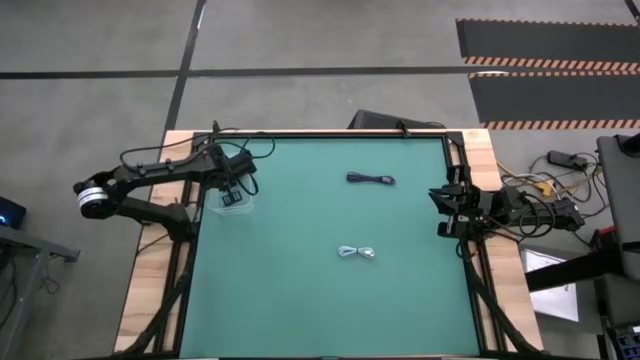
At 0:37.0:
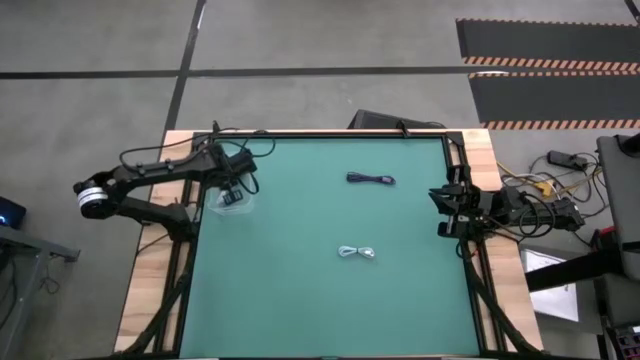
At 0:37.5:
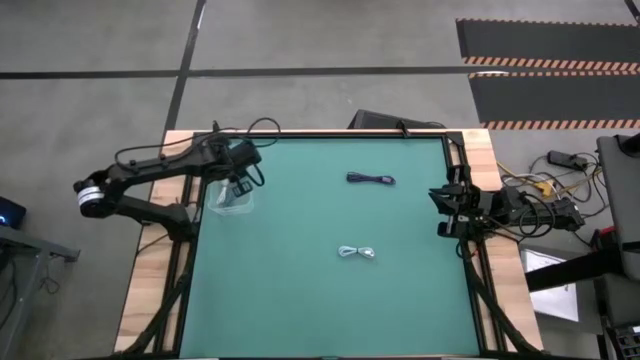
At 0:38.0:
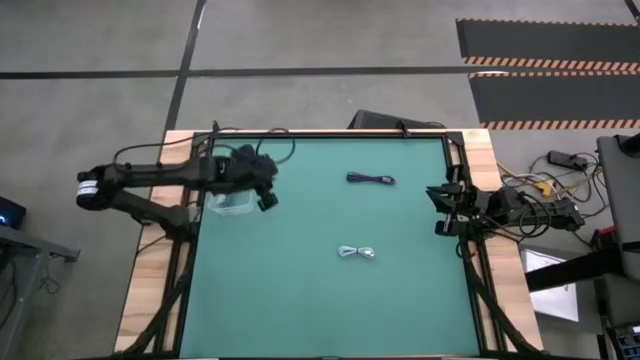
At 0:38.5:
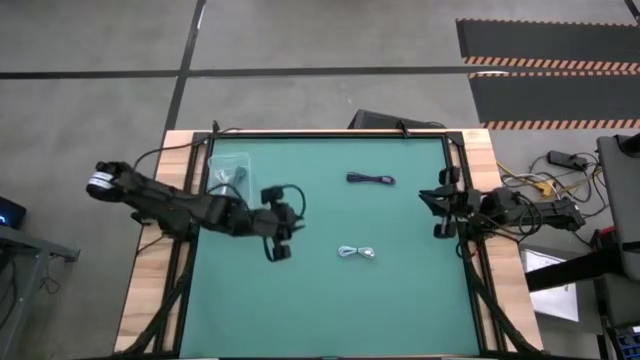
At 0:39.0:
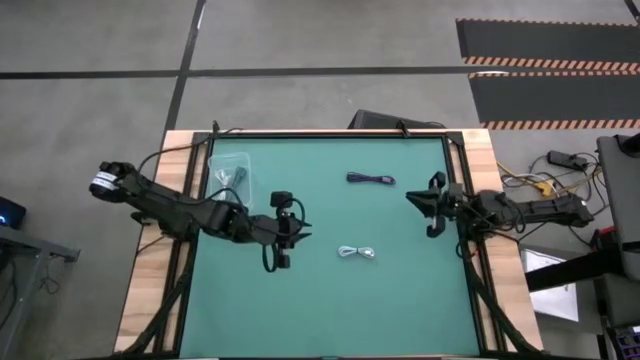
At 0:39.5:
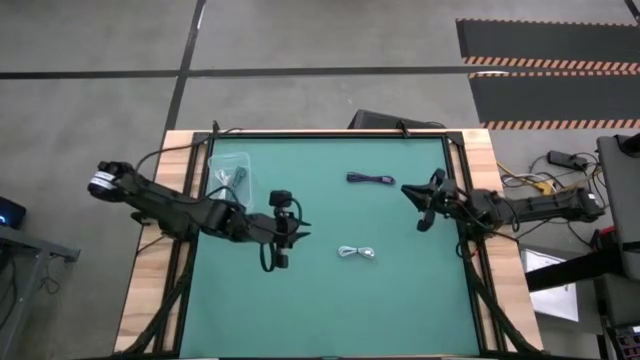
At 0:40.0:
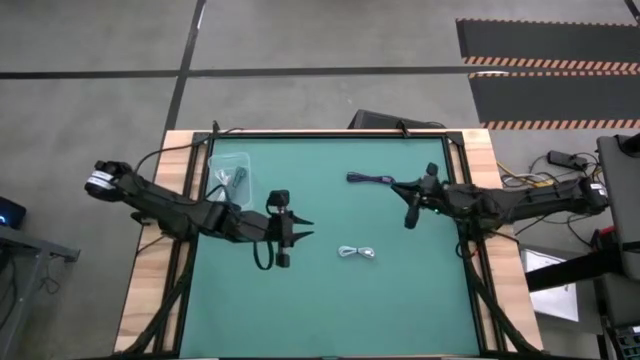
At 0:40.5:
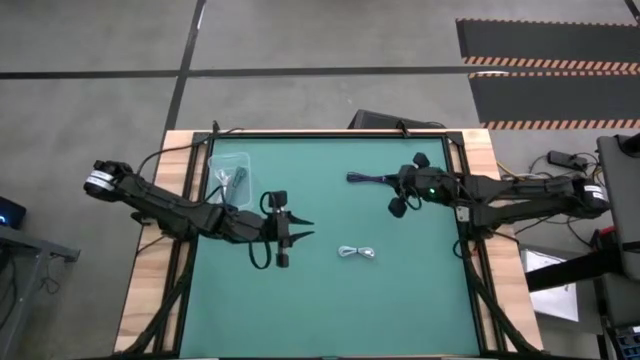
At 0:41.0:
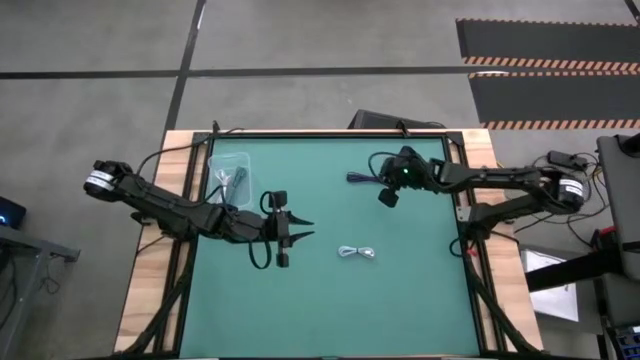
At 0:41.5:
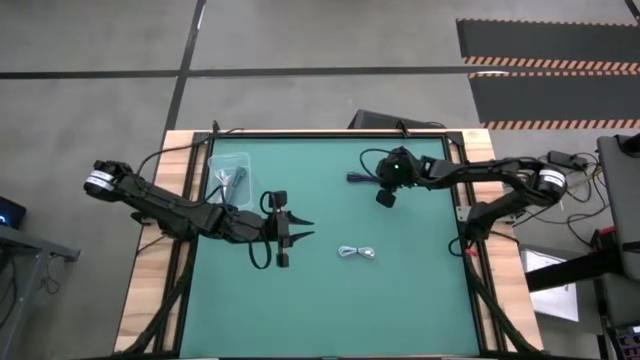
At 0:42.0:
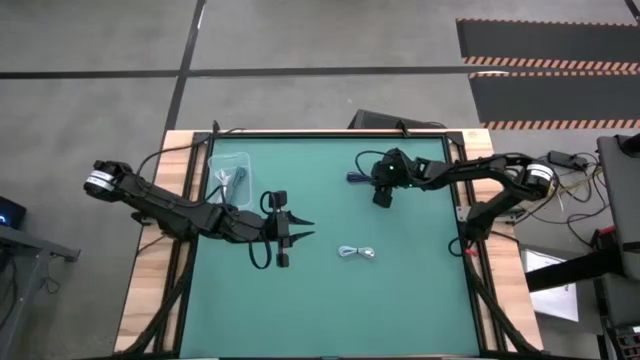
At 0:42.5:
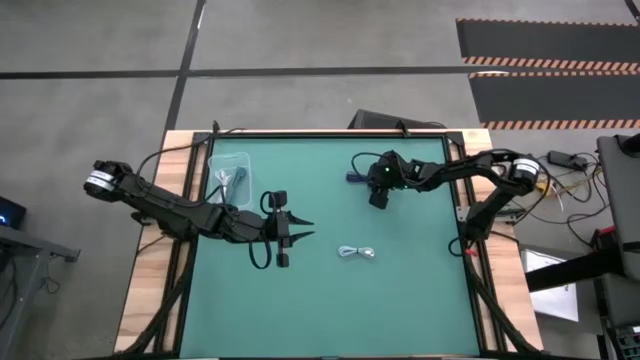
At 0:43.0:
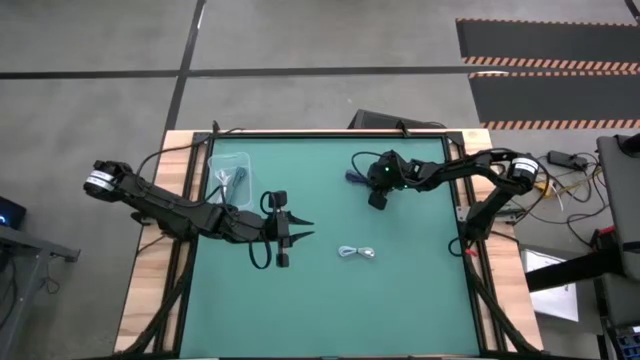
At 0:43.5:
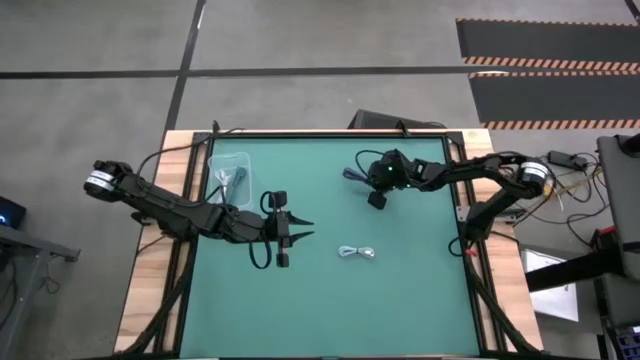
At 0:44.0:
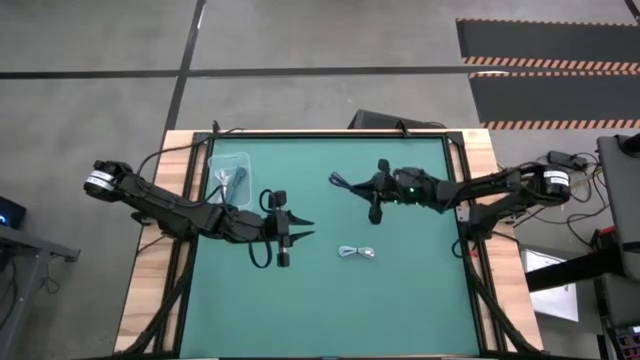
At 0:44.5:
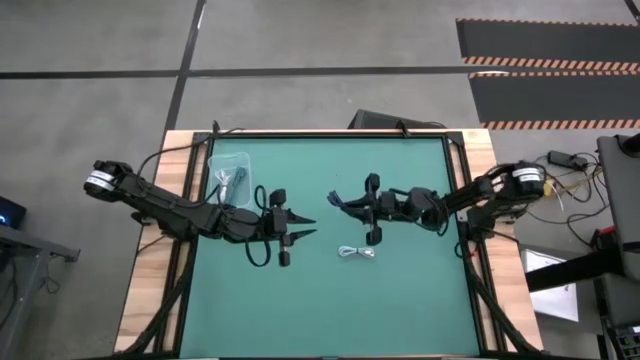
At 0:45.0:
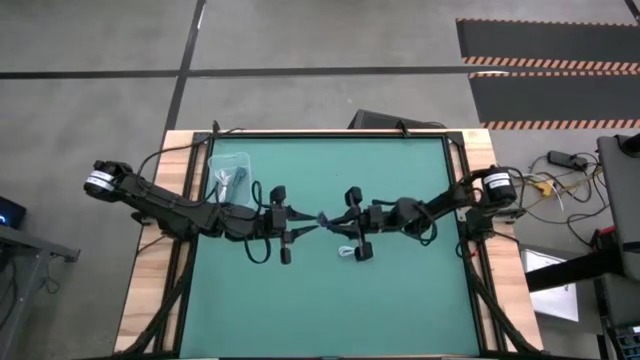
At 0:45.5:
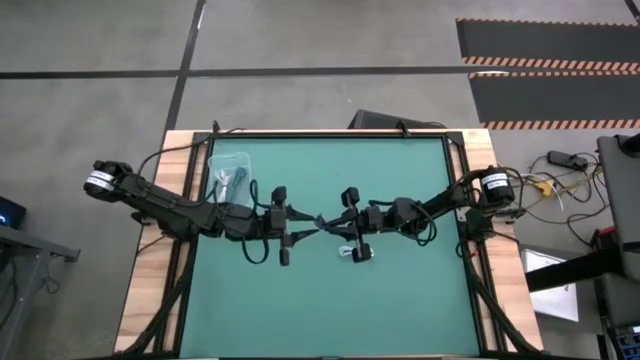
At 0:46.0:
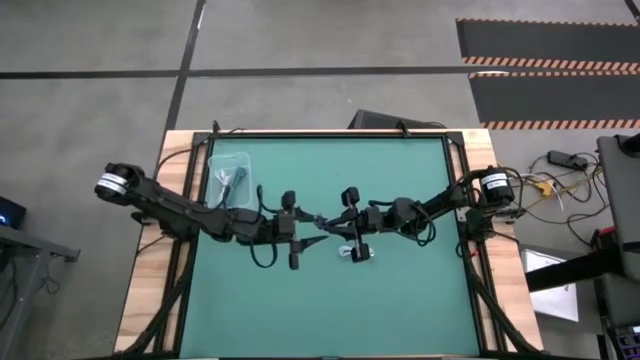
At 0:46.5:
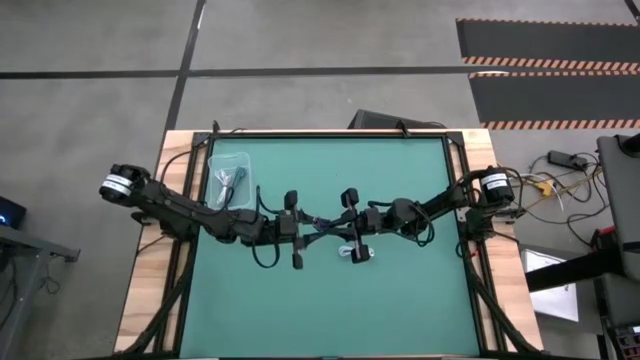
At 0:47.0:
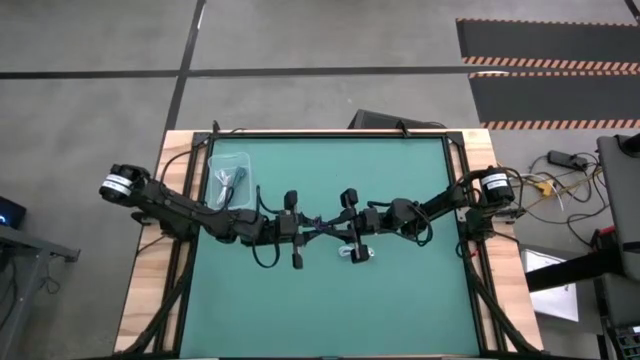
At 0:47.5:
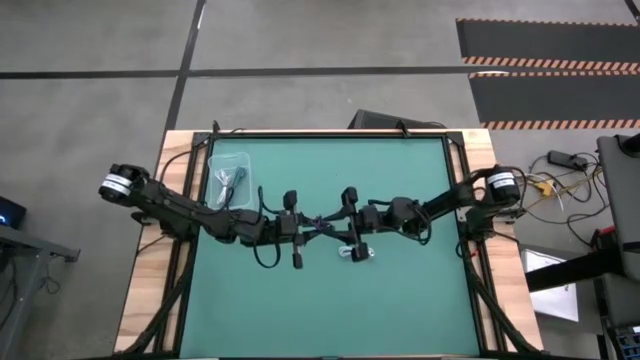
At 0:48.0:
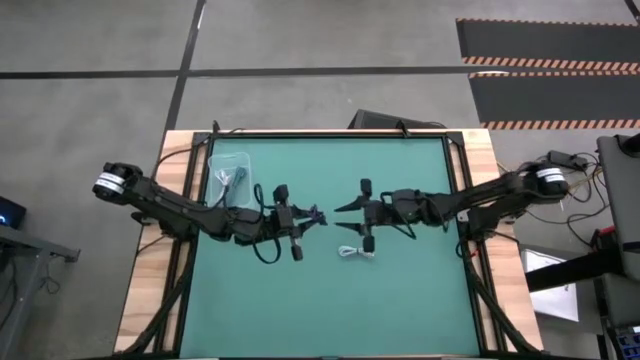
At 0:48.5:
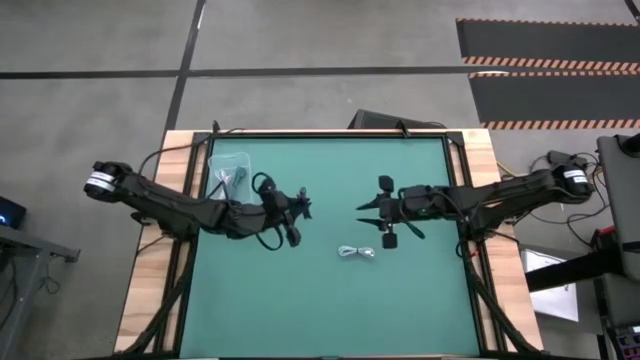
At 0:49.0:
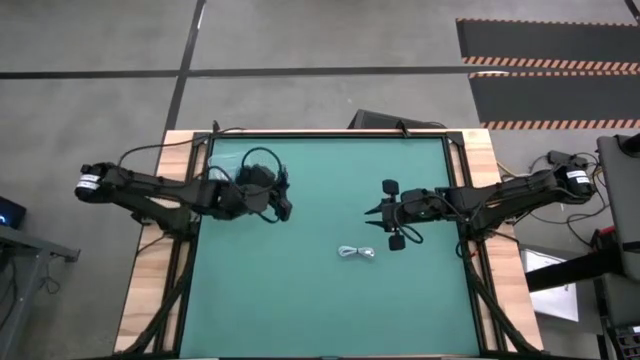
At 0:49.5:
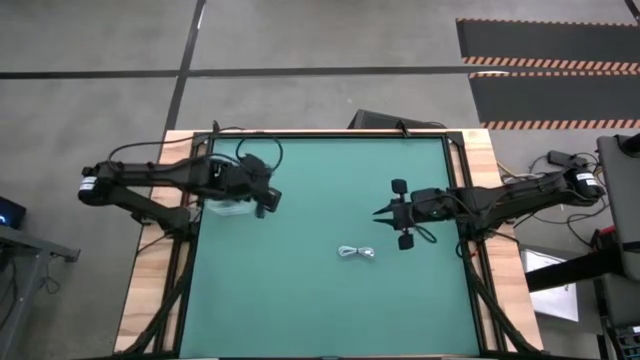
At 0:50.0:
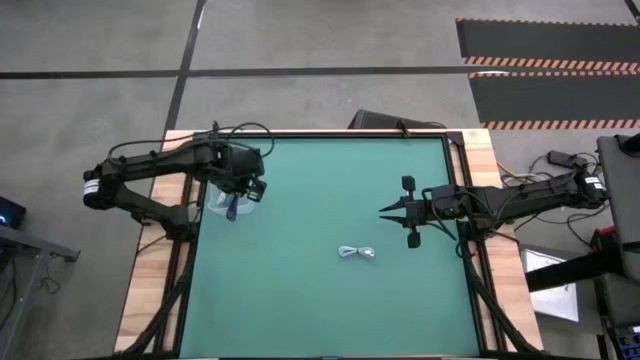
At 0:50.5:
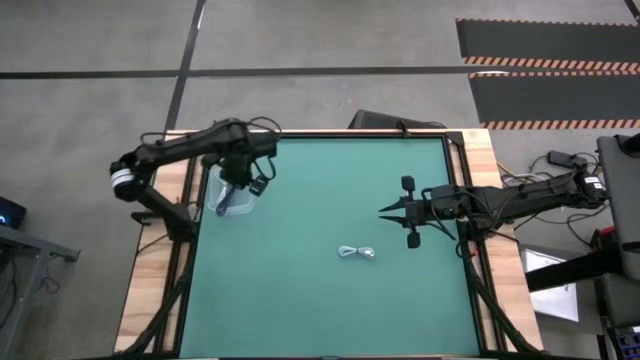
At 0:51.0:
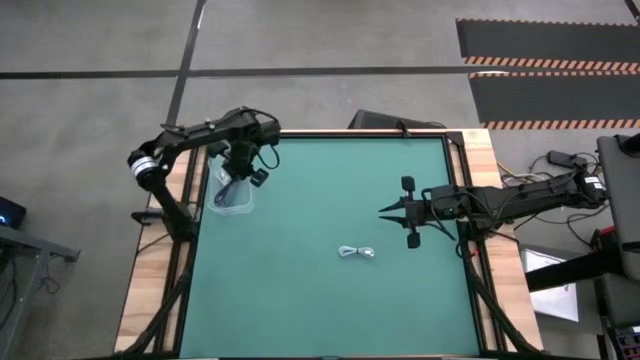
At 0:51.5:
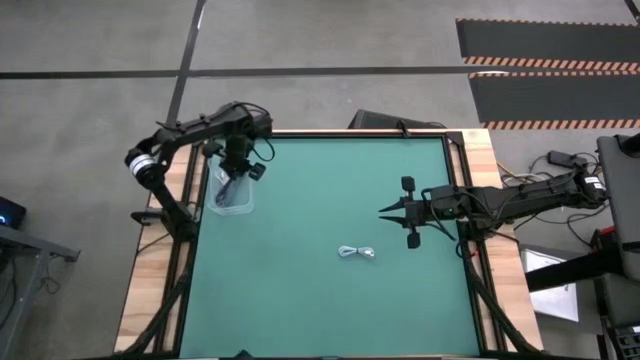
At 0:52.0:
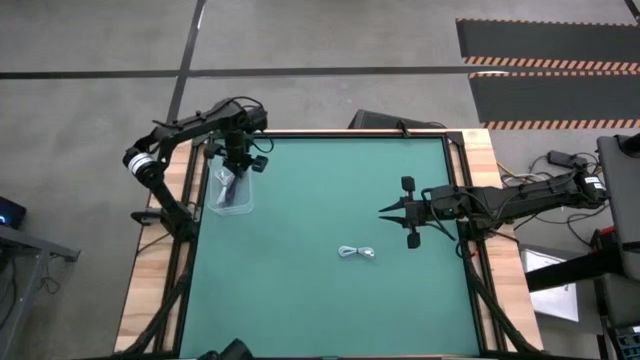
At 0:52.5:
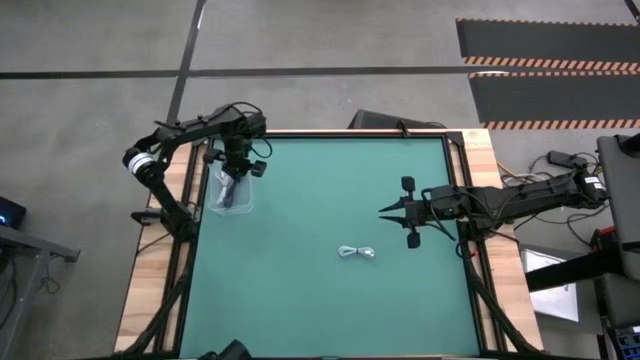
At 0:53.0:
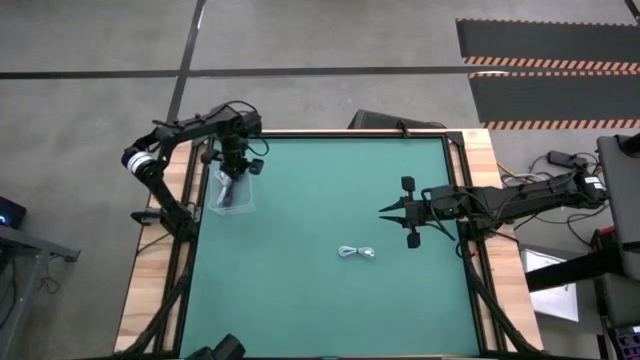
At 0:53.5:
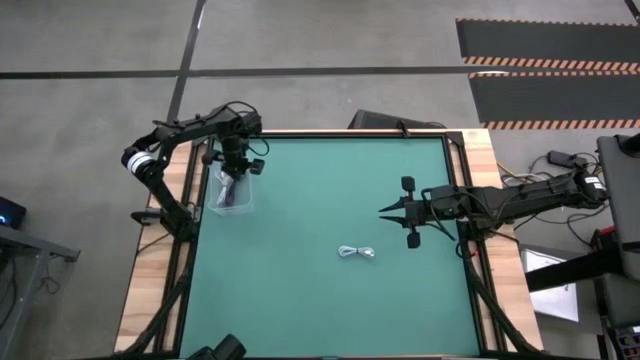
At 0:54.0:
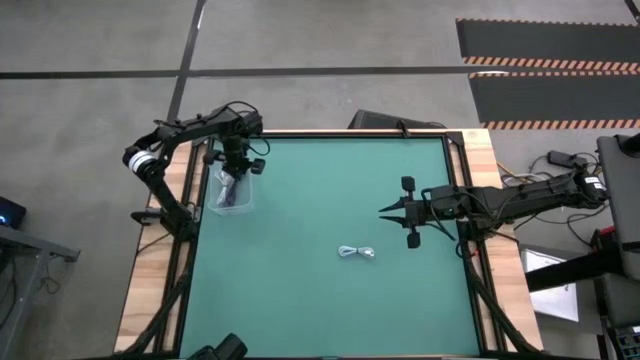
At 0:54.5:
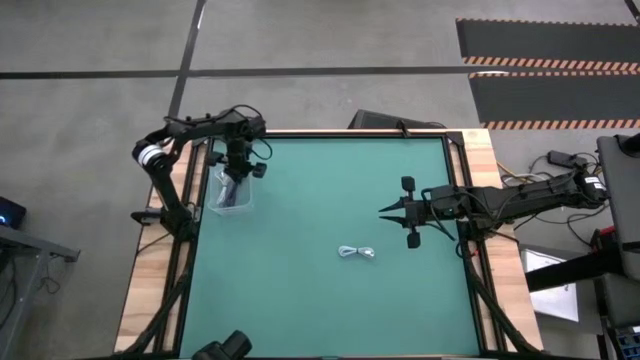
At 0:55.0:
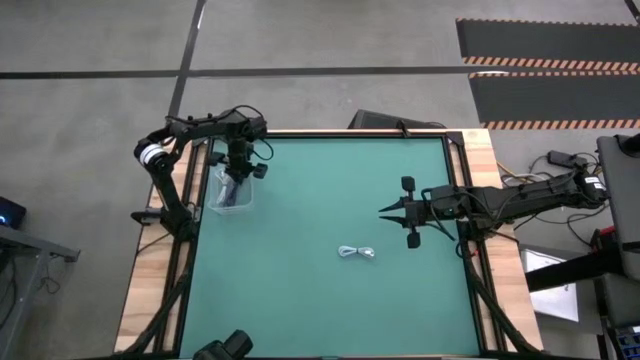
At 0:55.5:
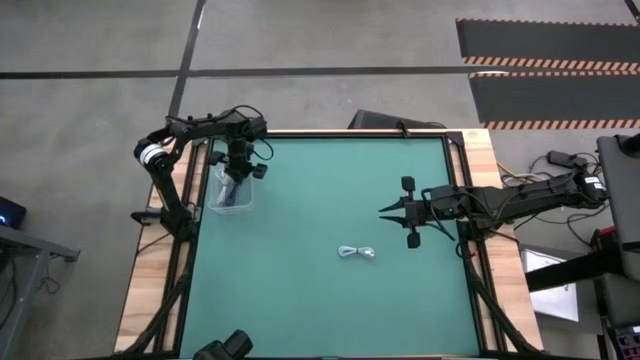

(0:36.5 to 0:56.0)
Task: Pick and place USB-C Cables
Put the violet charger cable into the transparent bin

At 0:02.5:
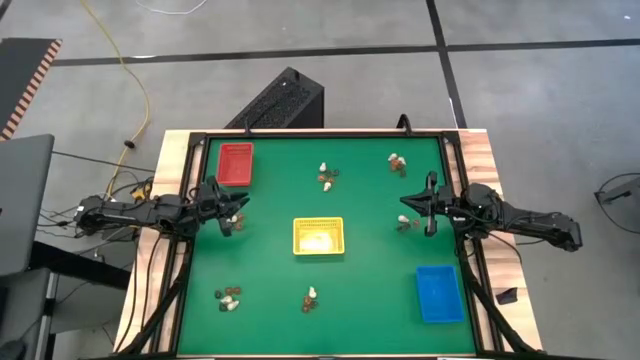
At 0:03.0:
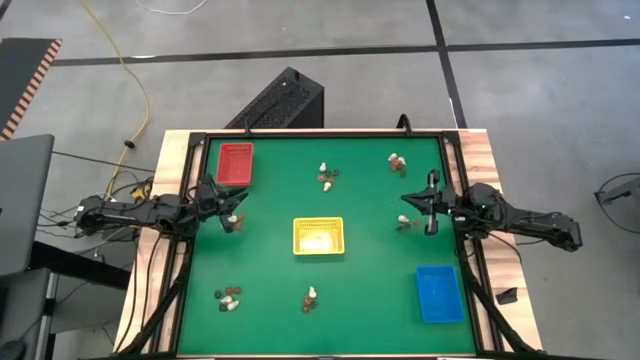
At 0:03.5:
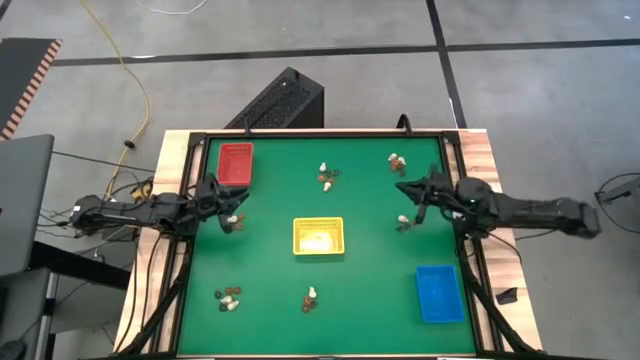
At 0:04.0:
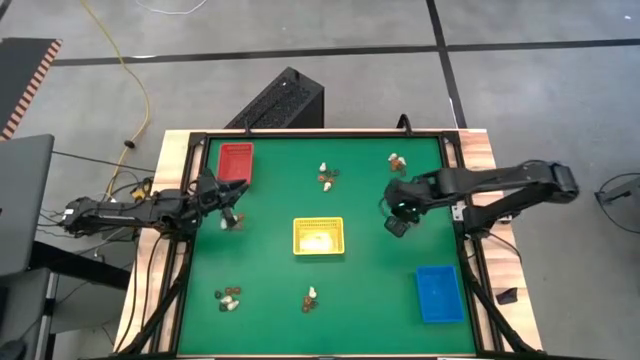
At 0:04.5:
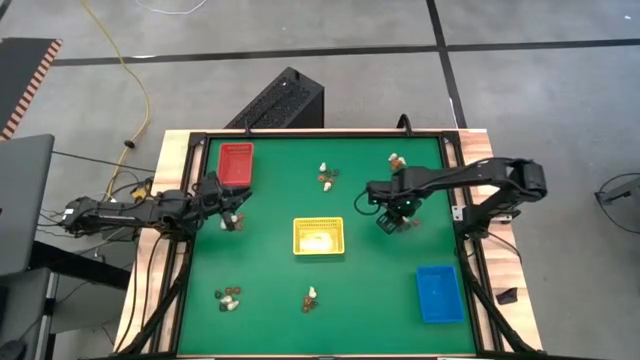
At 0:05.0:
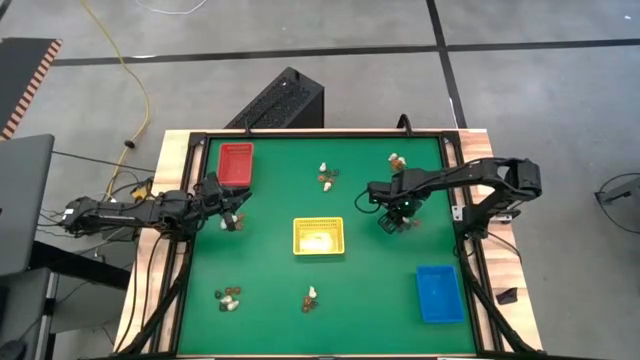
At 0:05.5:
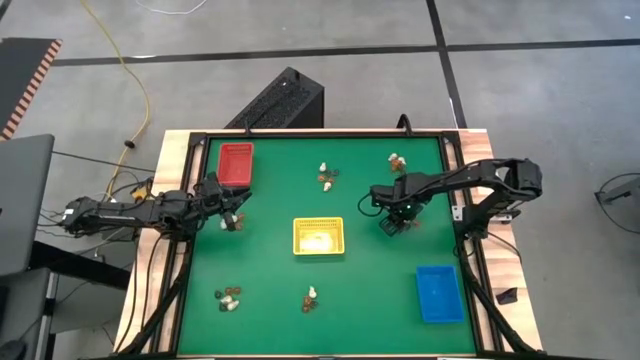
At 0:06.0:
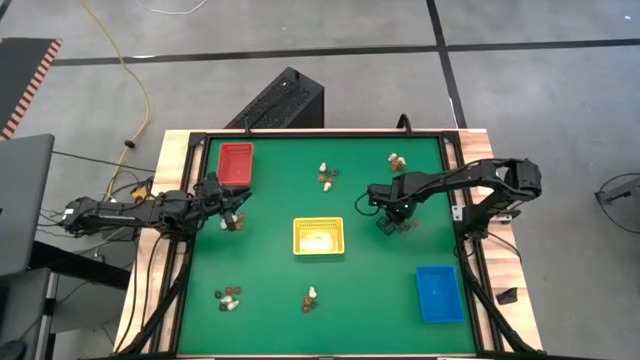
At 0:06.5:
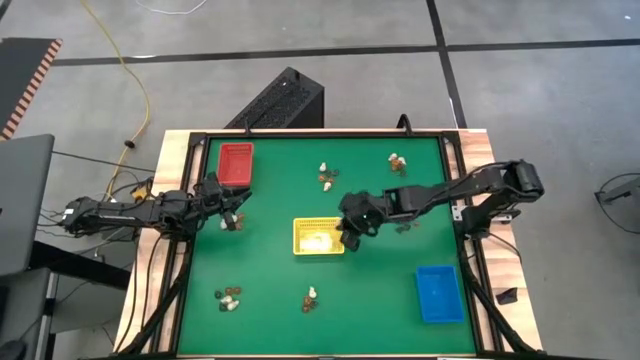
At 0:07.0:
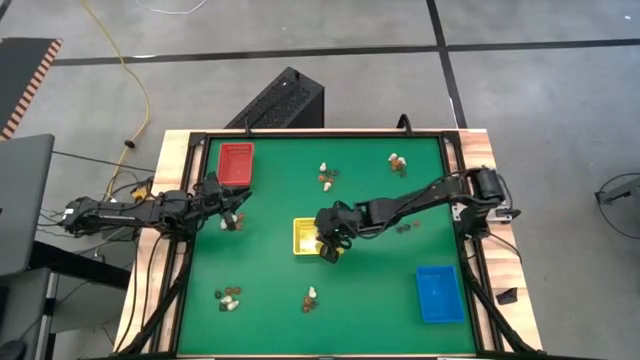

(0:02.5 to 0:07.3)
Task: Sort Halloween decoration
Put the white skull toy into the yellow bin
